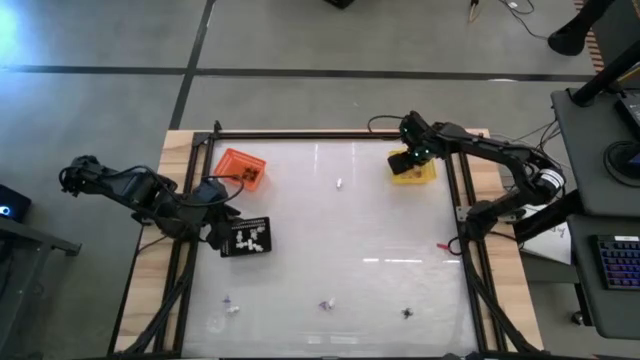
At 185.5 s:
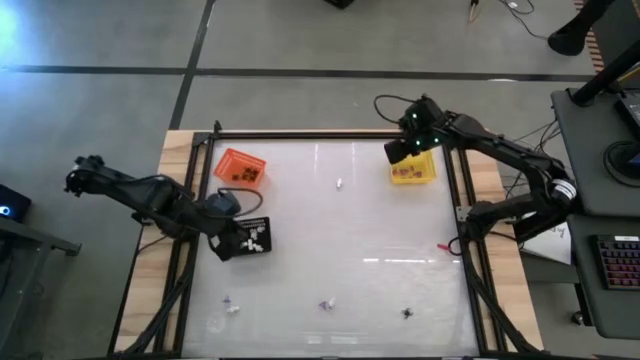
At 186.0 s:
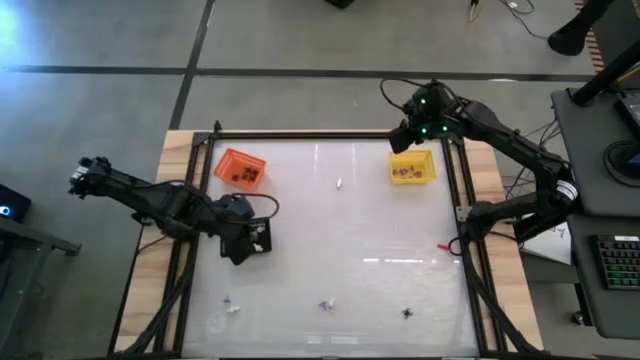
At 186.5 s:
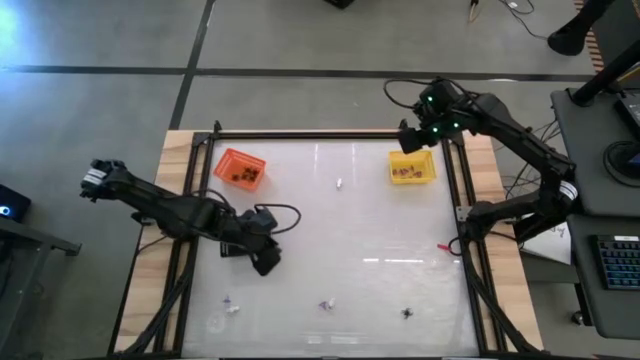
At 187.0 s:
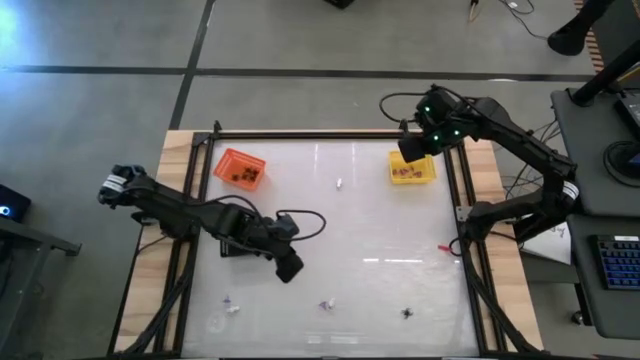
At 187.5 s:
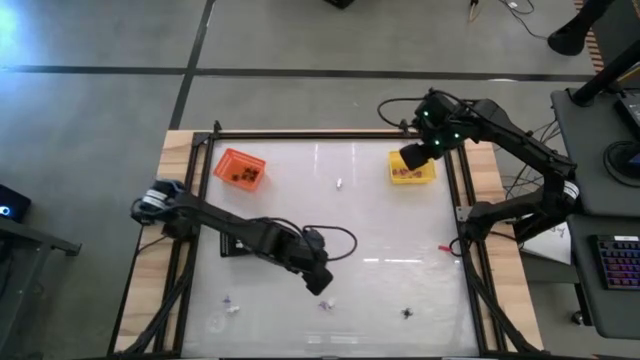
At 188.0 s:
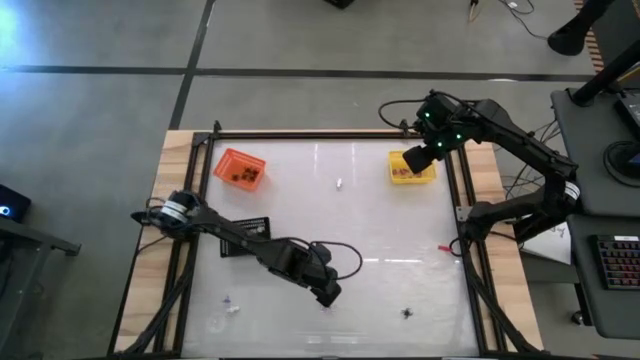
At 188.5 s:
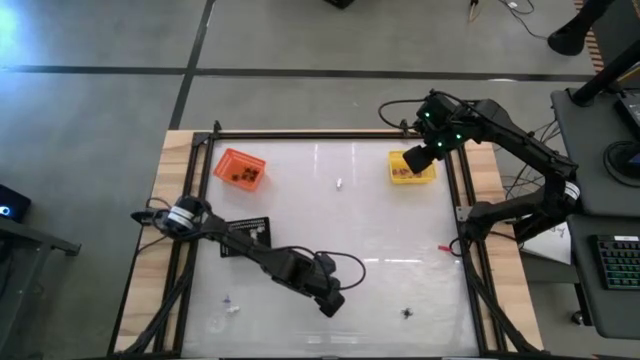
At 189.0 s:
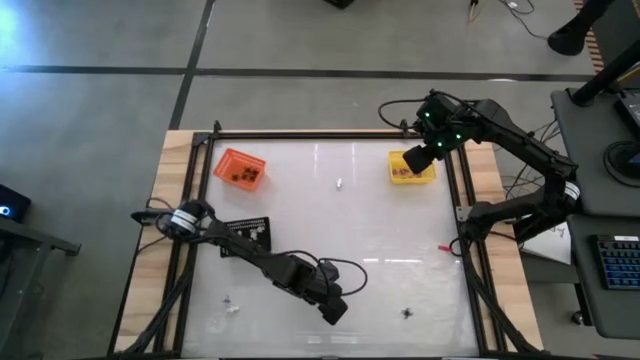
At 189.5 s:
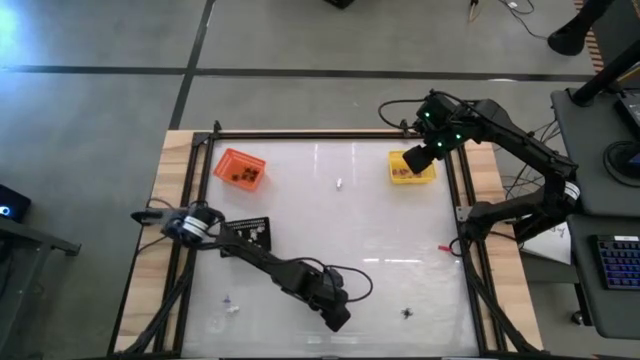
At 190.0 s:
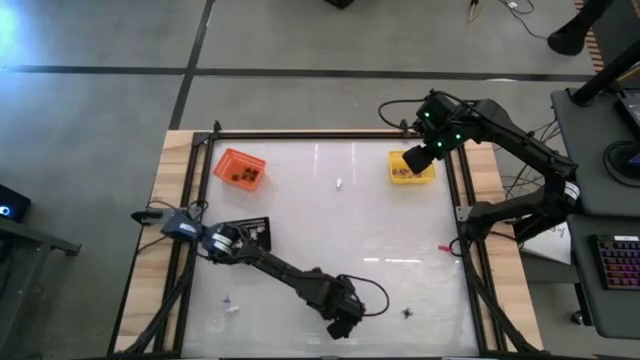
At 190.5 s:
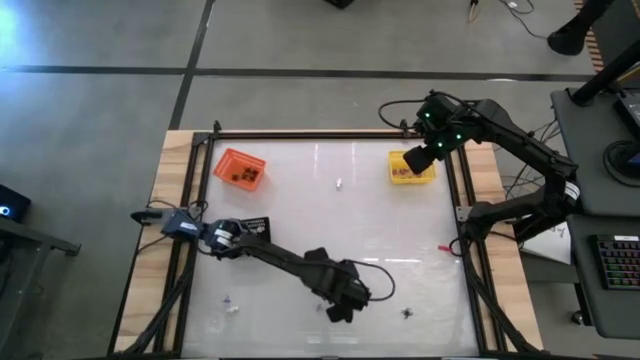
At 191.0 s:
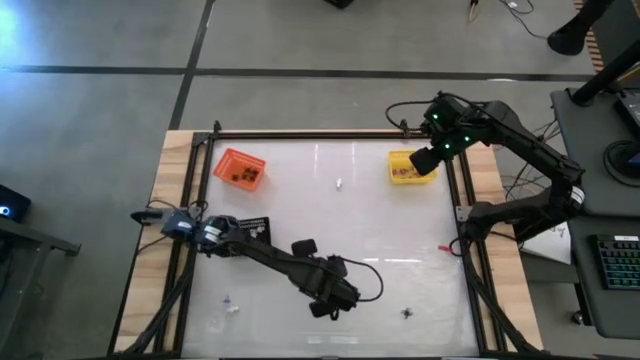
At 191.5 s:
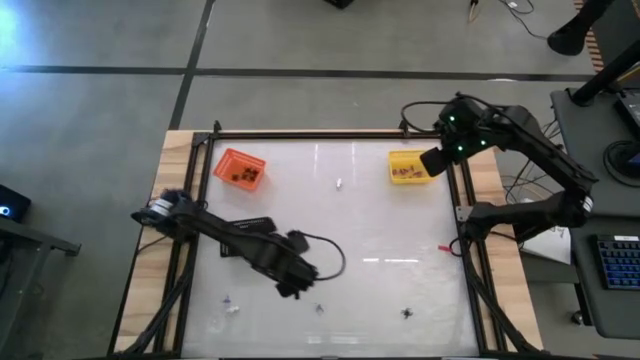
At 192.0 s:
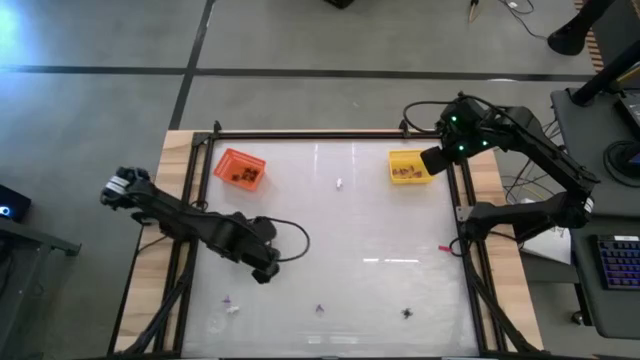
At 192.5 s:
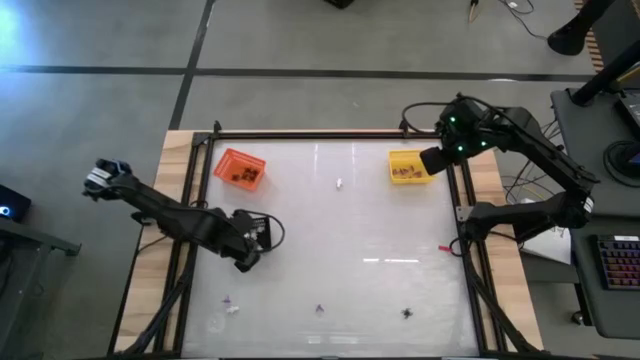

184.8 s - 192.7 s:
Task: Sort Halloween decoration
Put the white skeleton toy into the black bin

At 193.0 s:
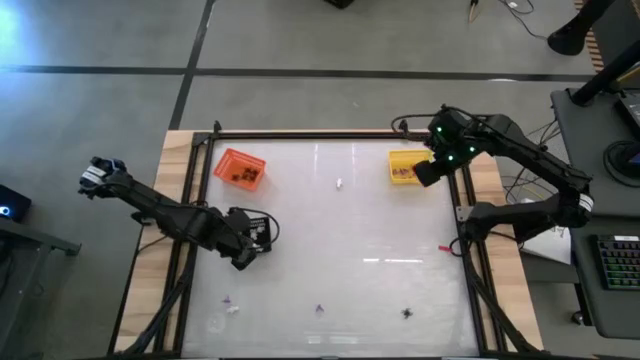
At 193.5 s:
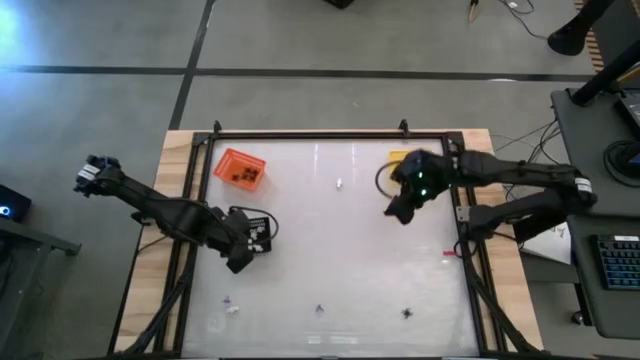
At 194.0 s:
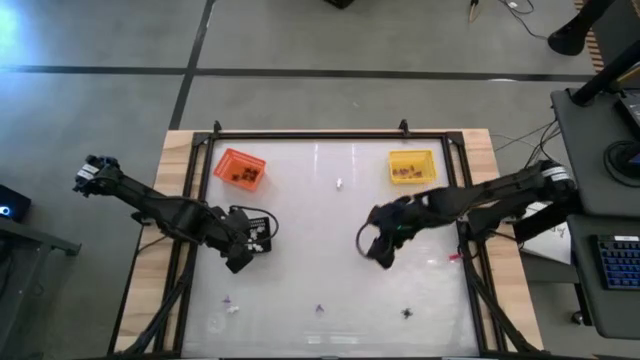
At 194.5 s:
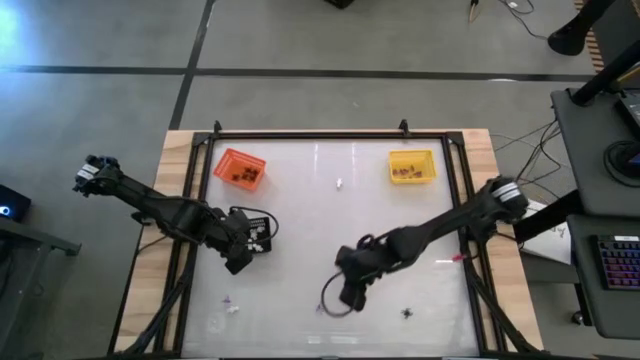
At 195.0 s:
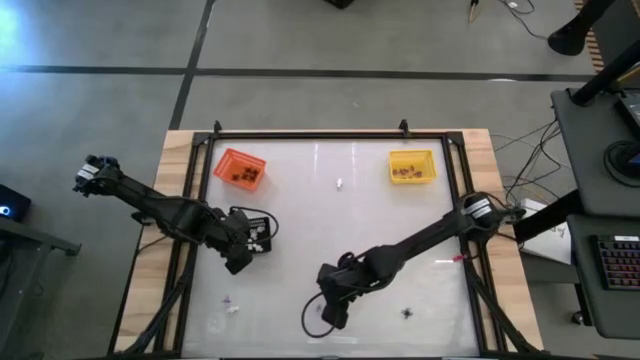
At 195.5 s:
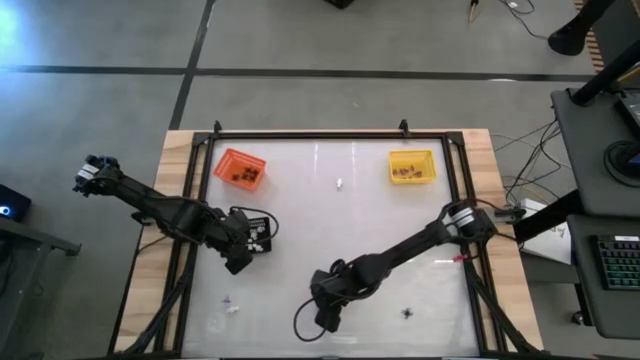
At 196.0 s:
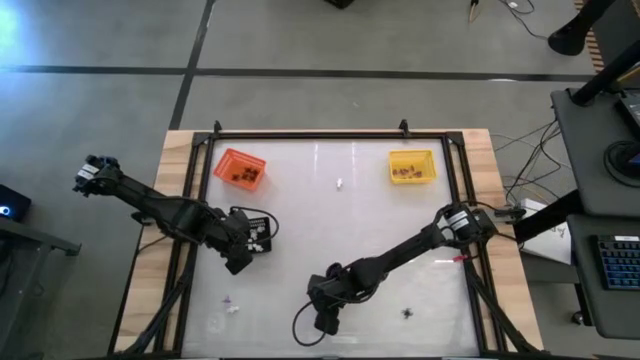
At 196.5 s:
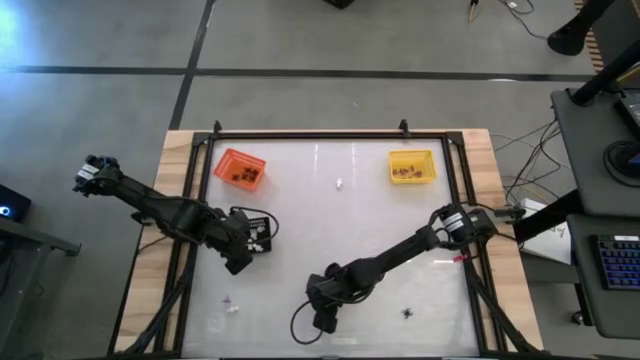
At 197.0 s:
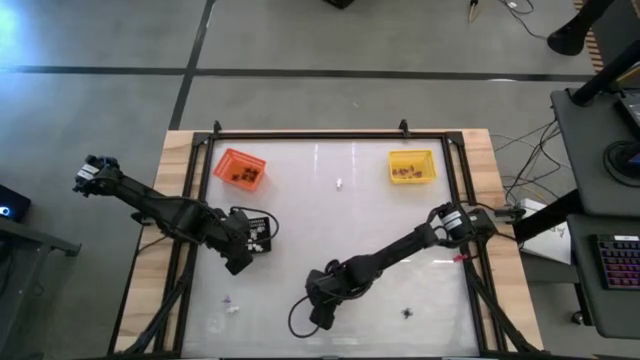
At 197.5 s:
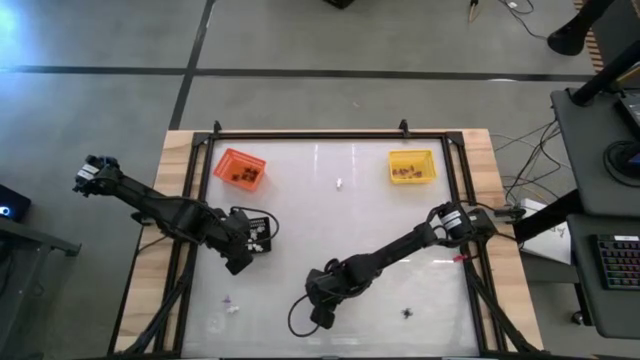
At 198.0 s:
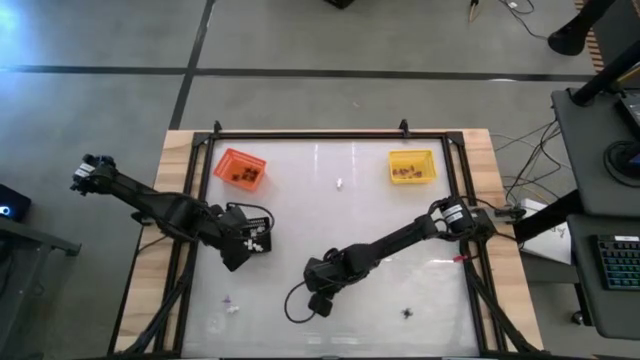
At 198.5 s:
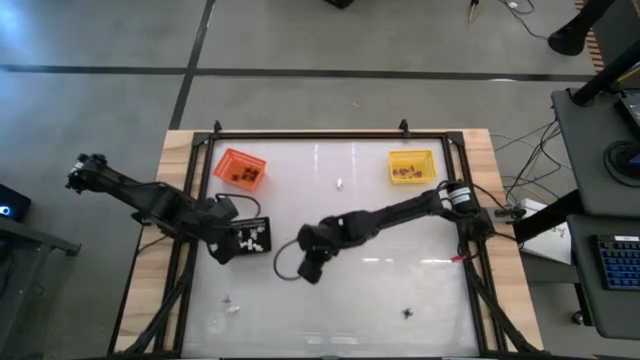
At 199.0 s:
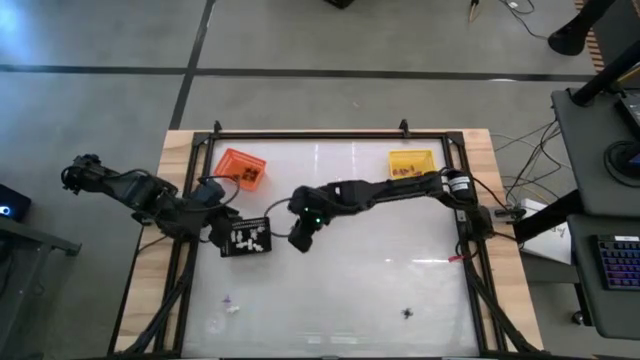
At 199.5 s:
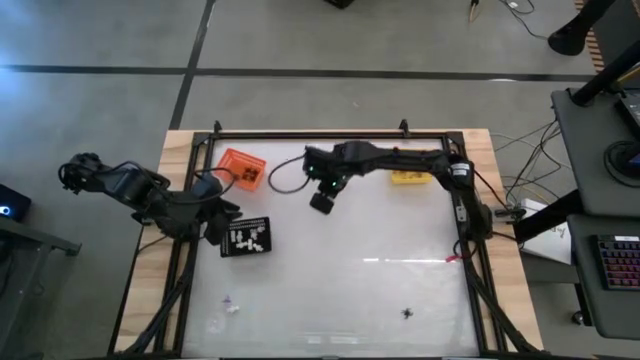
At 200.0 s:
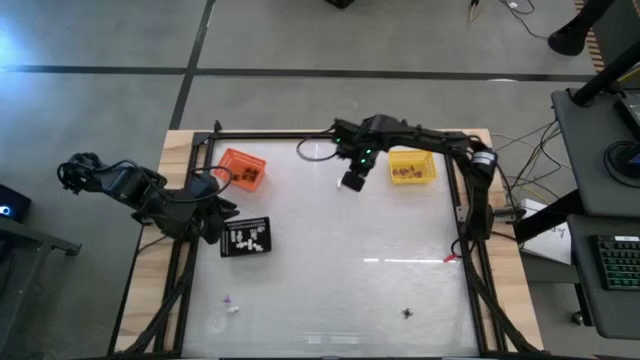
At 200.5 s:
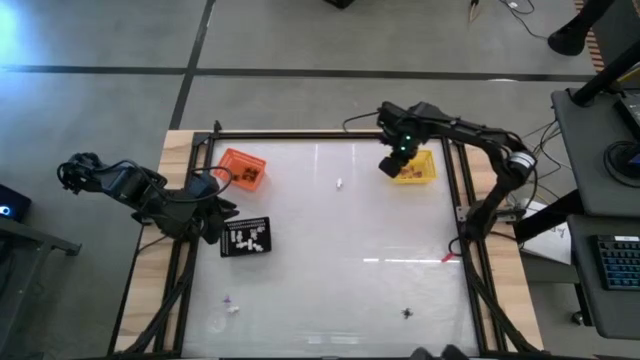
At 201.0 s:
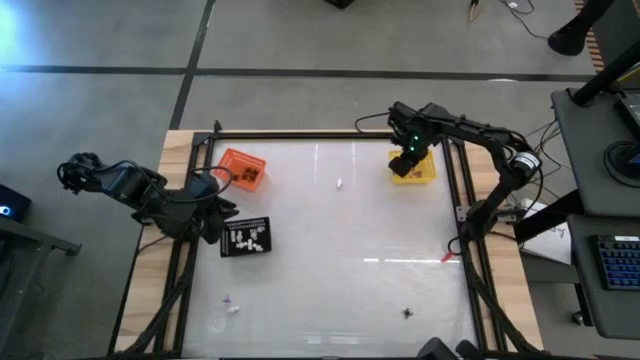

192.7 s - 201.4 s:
Put the purple witch hat toy into the yellow bin
